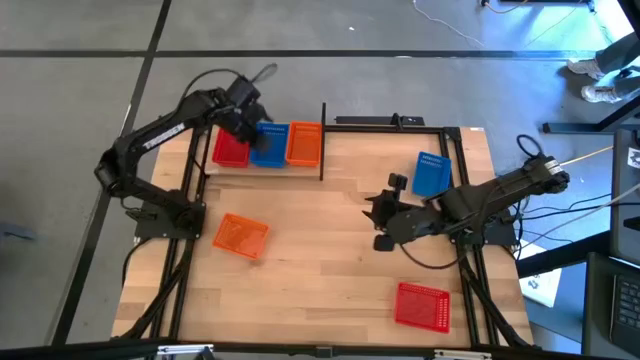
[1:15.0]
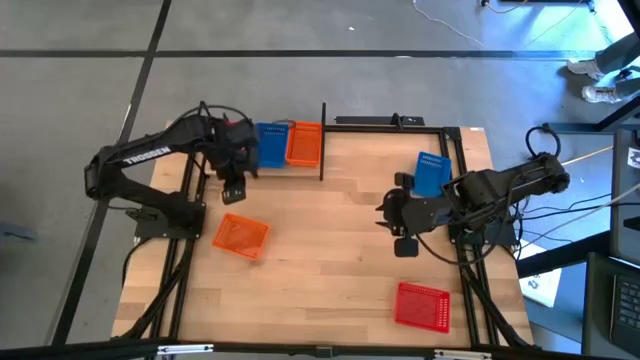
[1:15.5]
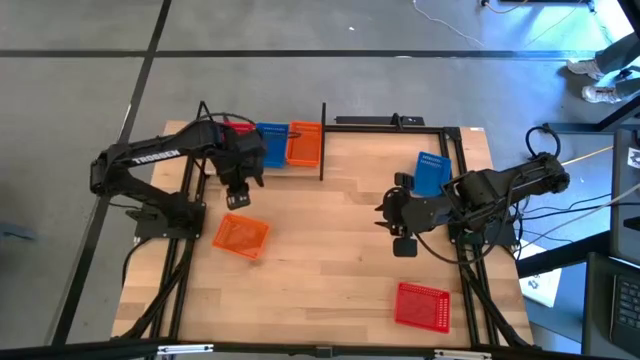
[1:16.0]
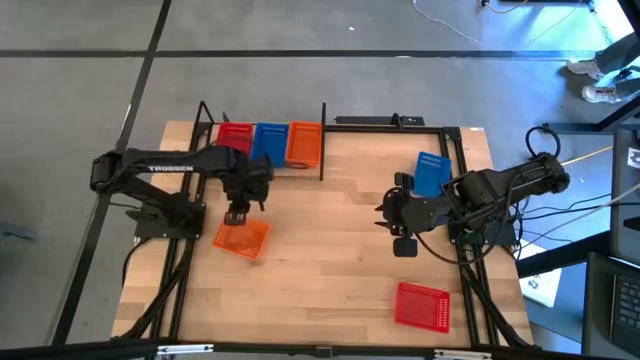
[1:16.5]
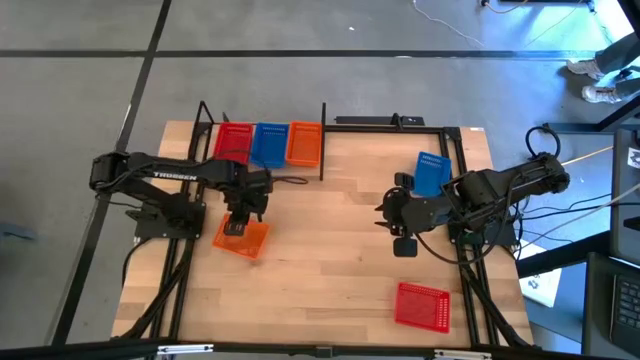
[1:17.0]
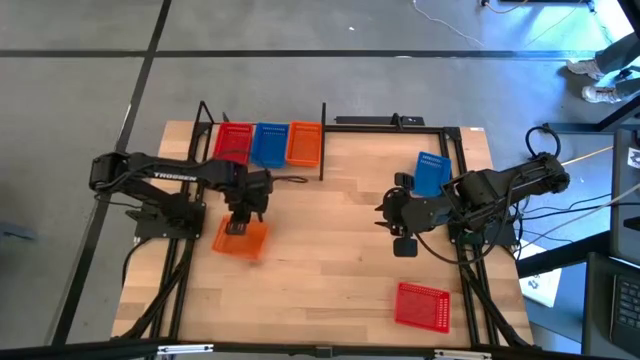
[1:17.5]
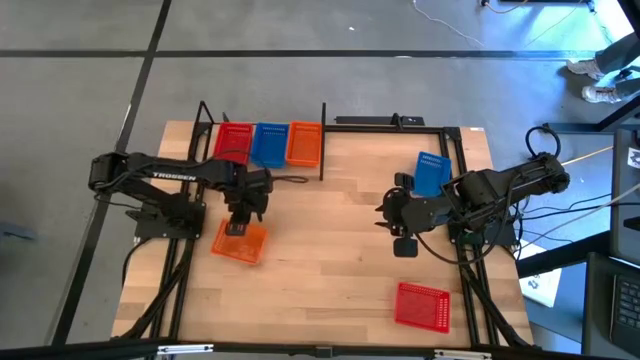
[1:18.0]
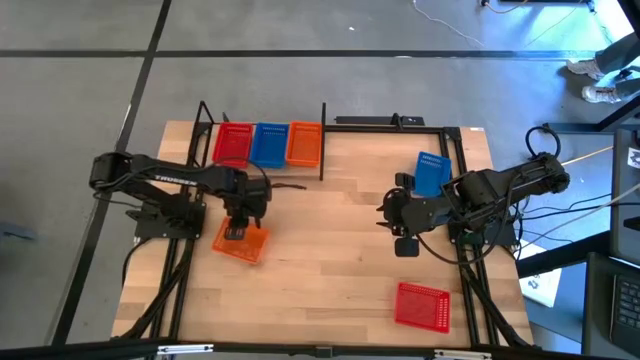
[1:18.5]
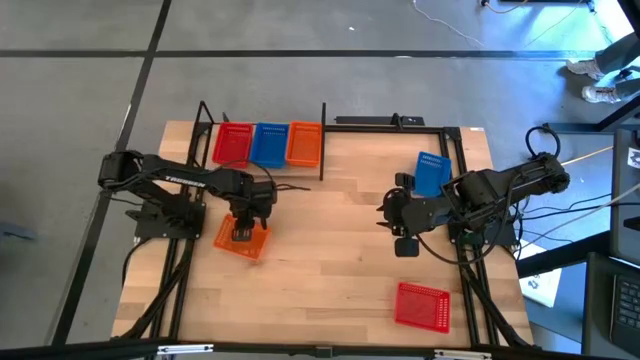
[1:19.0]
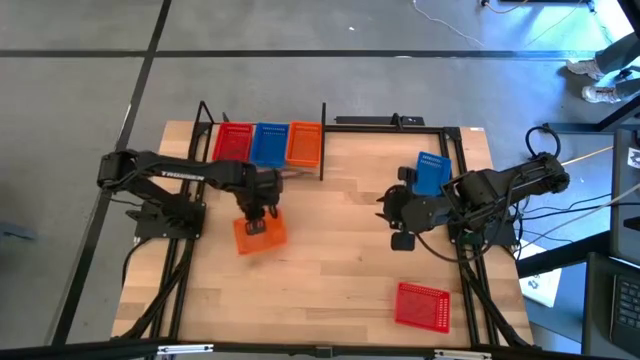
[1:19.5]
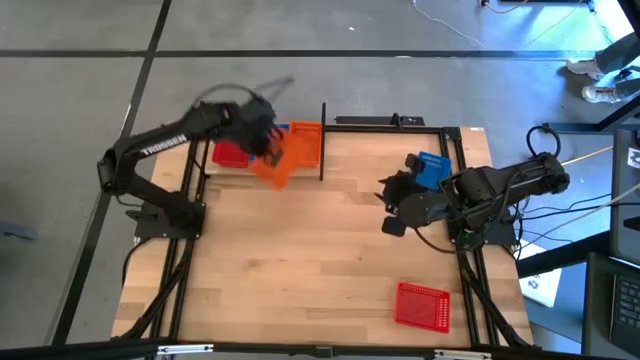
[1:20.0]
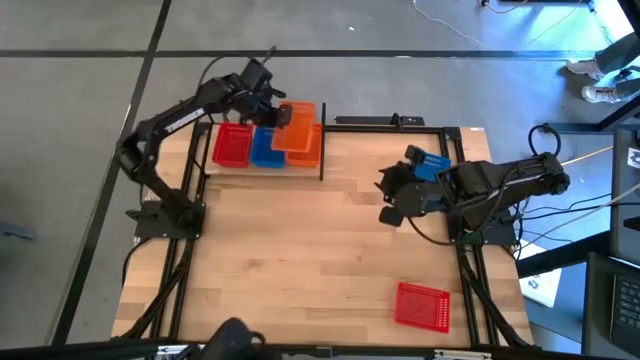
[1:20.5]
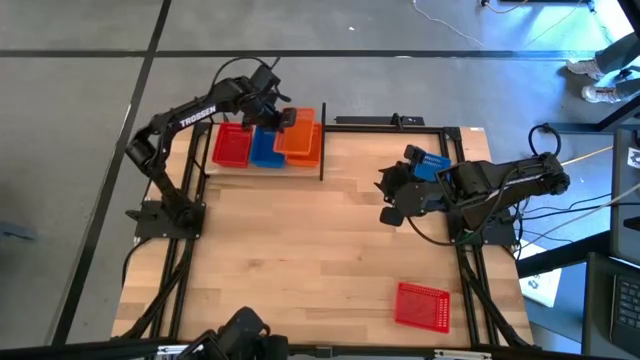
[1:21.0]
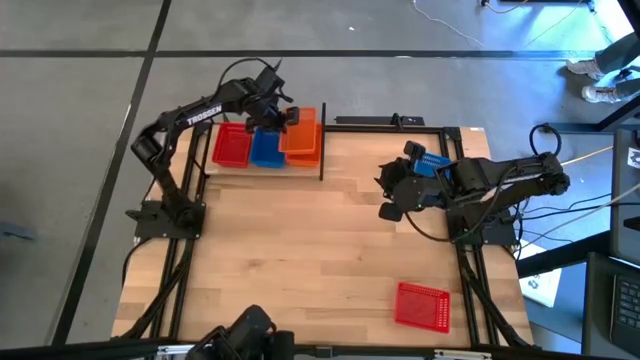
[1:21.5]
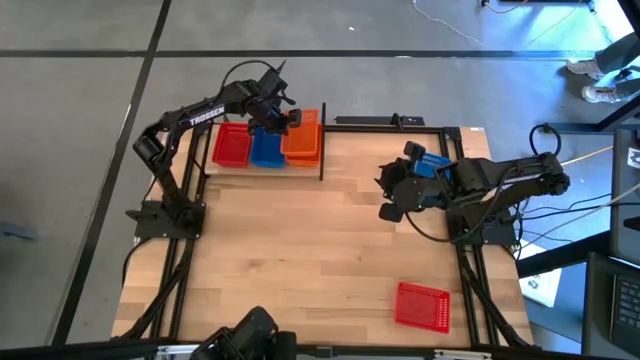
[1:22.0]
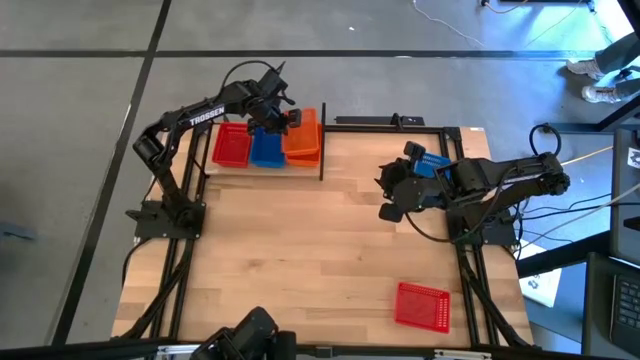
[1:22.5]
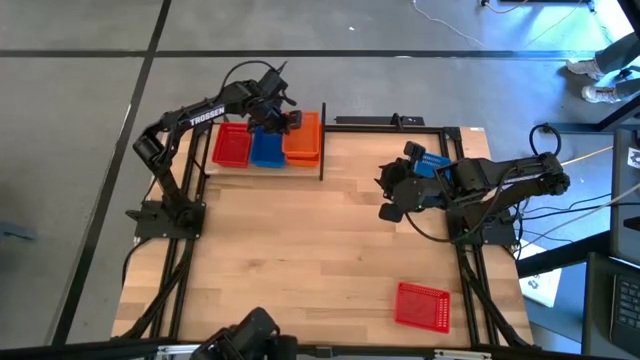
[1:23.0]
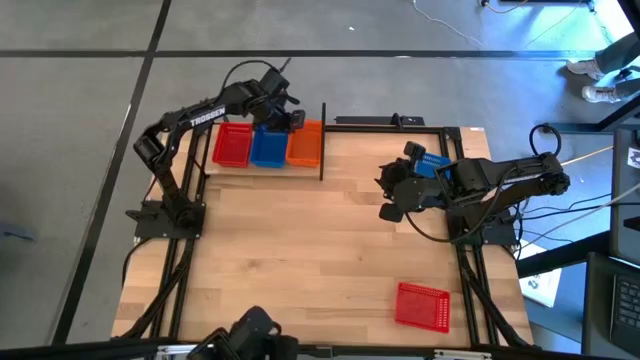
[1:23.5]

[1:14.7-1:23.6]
Task: Stack baskets on shelf by color
Stack the orange bin on the orange bins on the shelf

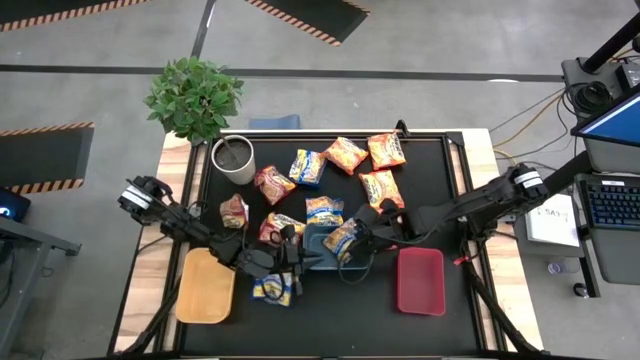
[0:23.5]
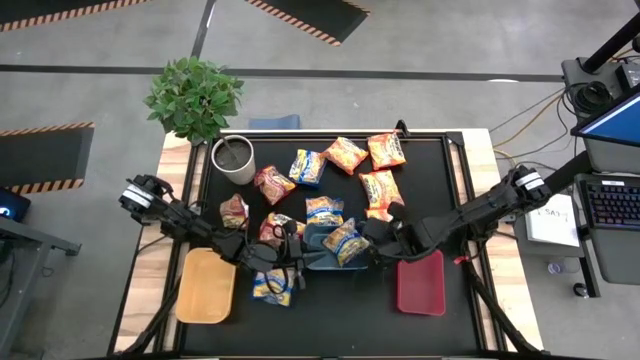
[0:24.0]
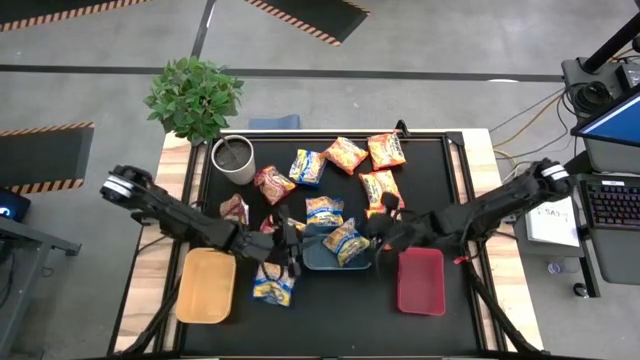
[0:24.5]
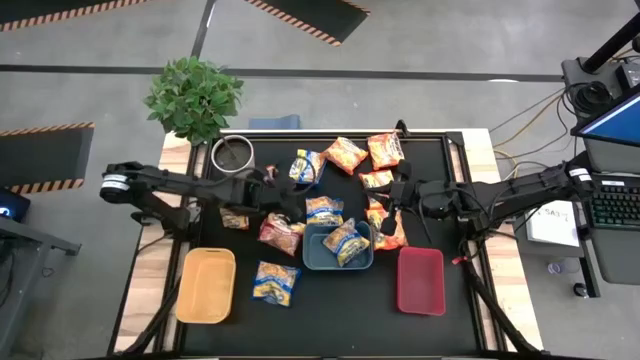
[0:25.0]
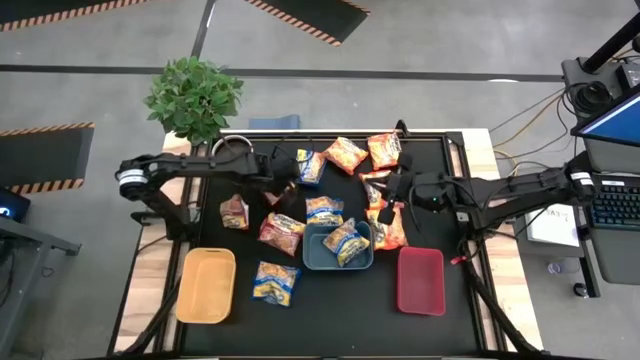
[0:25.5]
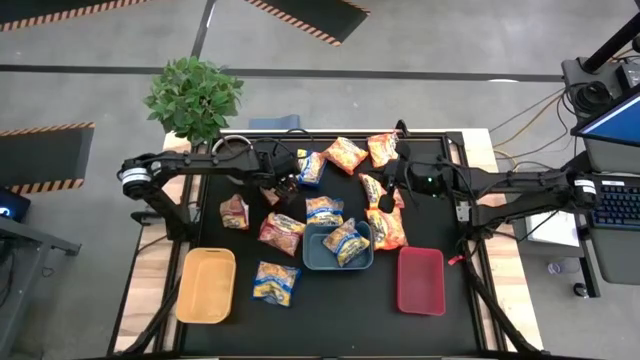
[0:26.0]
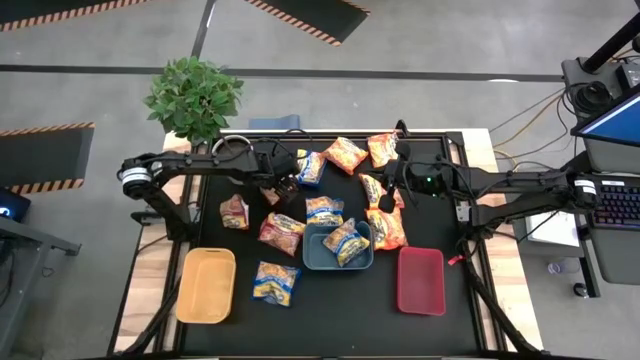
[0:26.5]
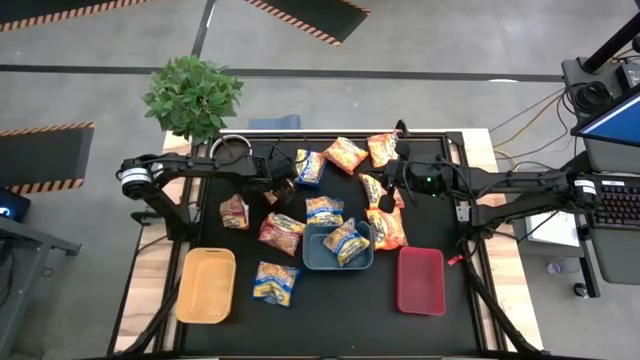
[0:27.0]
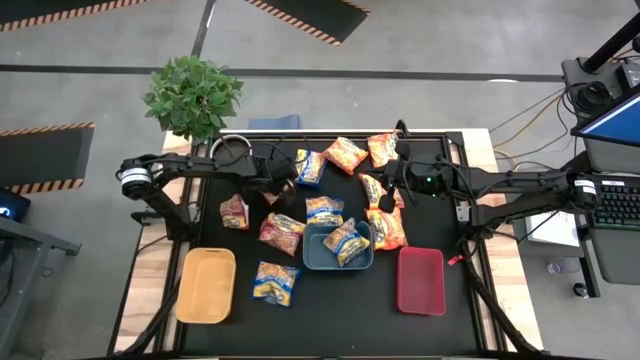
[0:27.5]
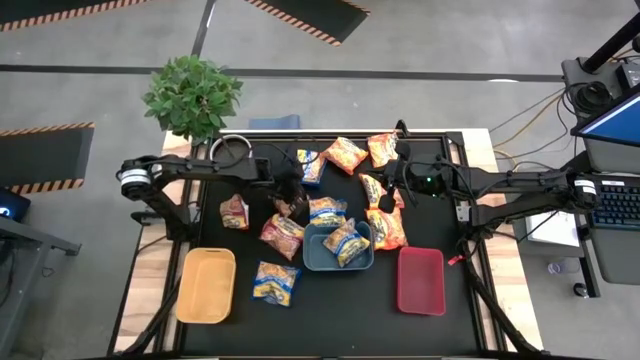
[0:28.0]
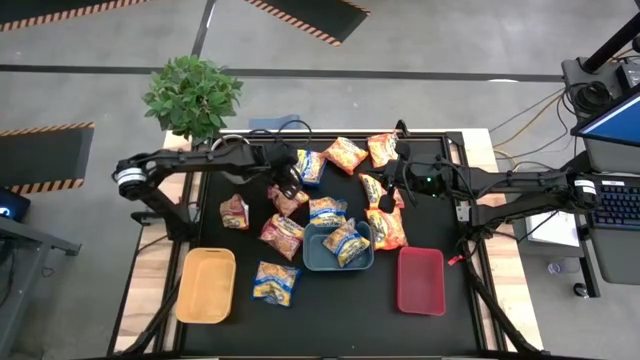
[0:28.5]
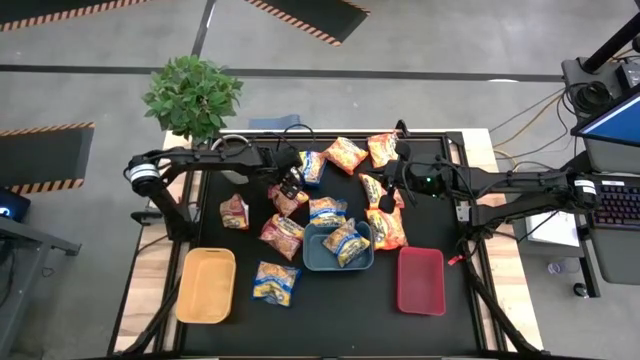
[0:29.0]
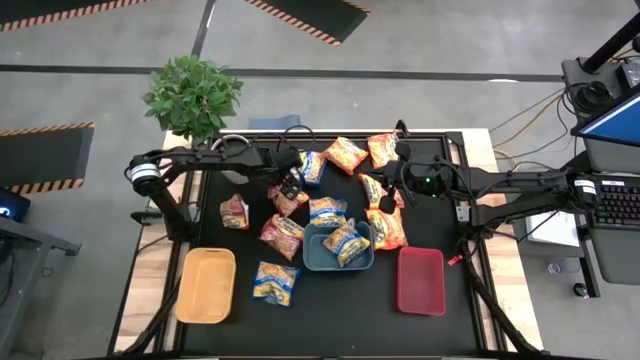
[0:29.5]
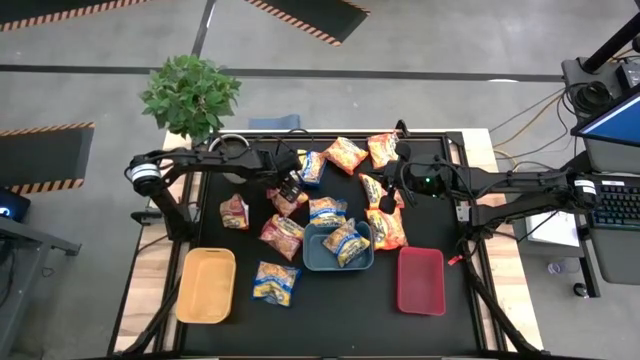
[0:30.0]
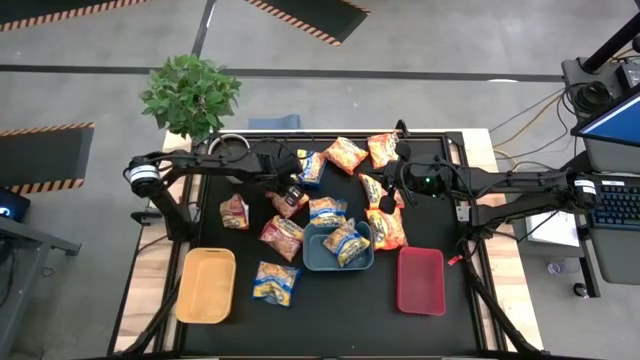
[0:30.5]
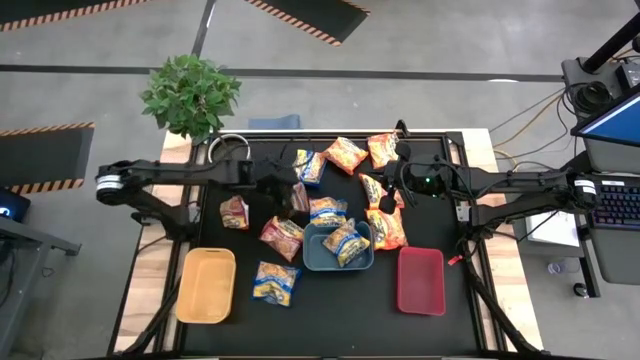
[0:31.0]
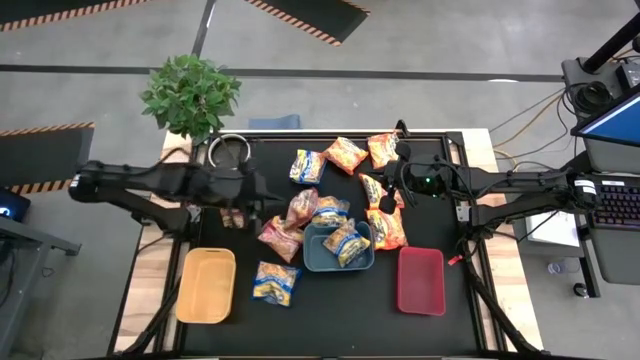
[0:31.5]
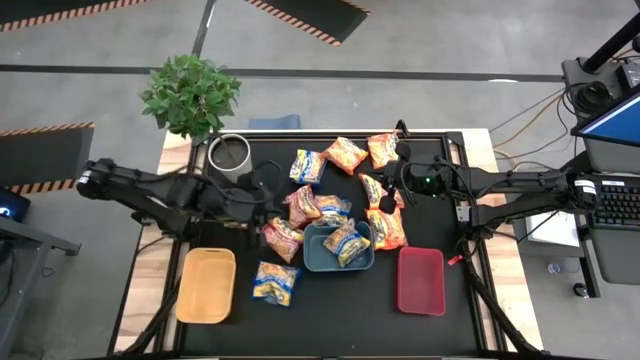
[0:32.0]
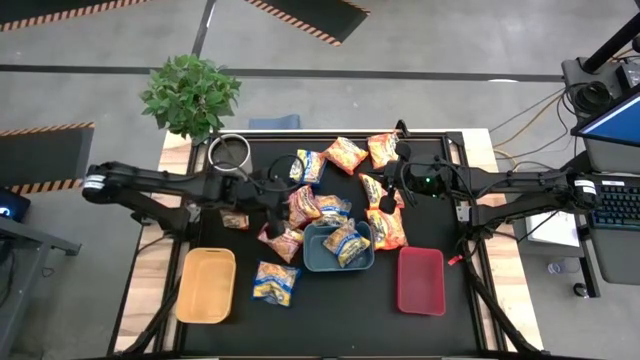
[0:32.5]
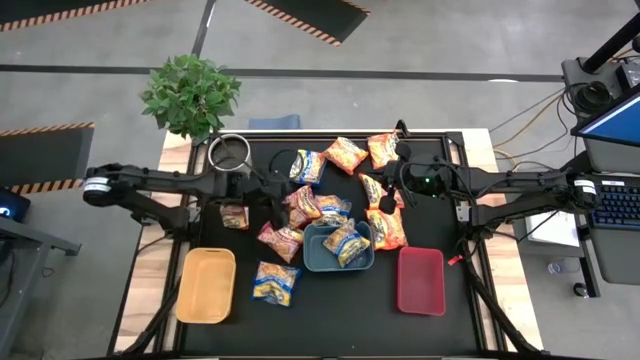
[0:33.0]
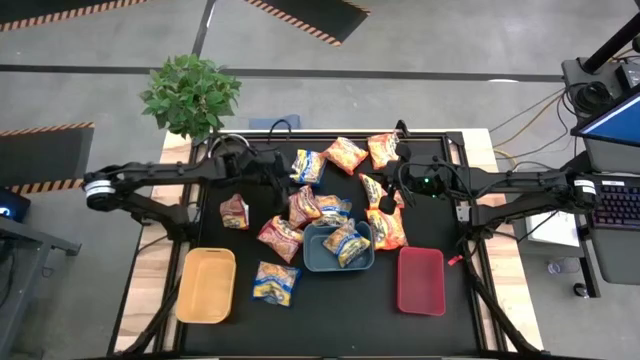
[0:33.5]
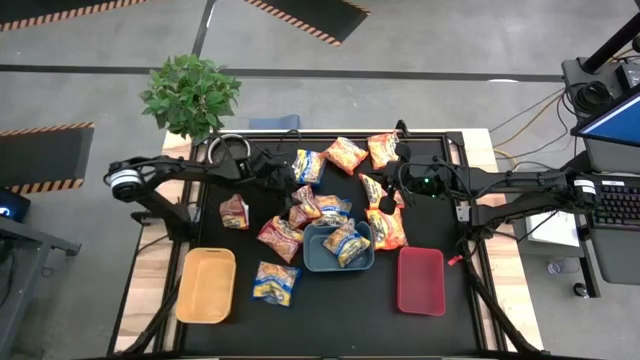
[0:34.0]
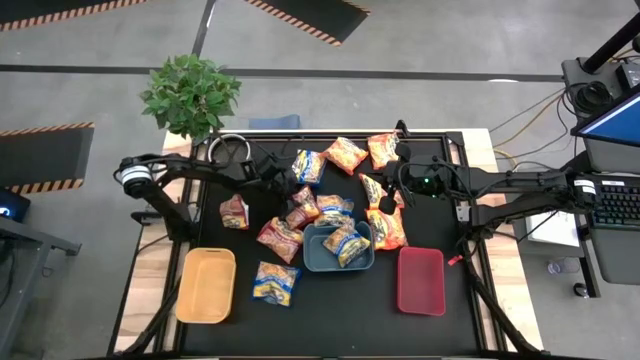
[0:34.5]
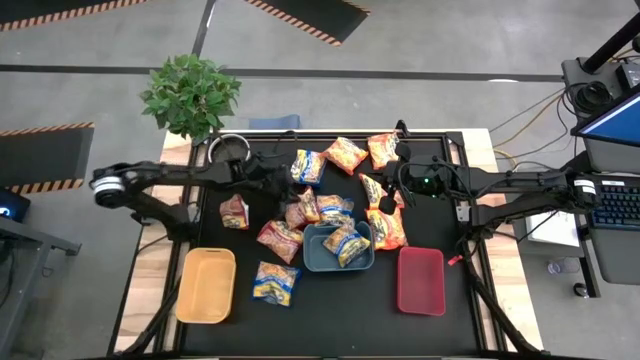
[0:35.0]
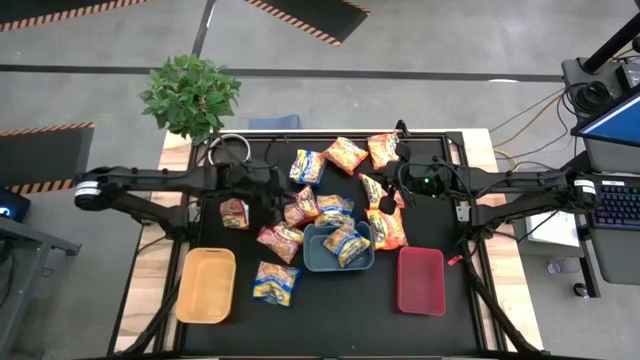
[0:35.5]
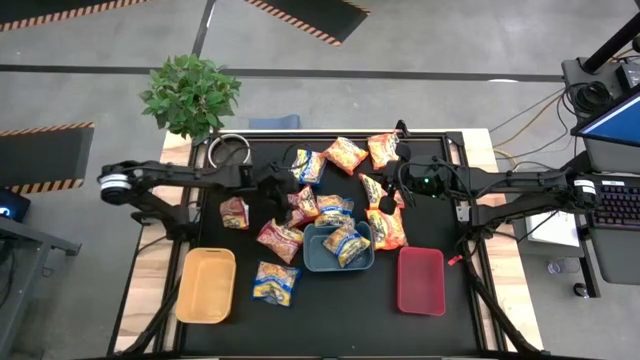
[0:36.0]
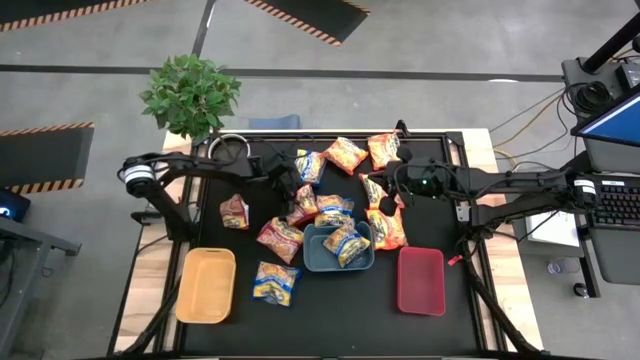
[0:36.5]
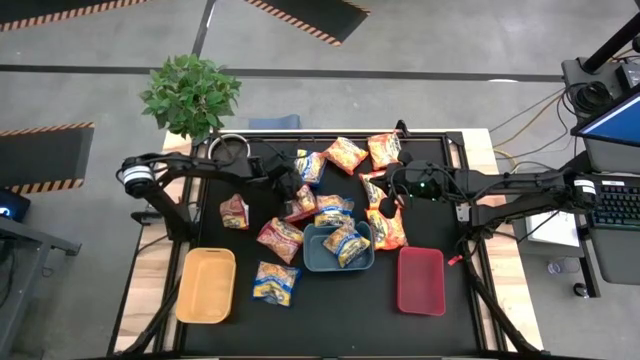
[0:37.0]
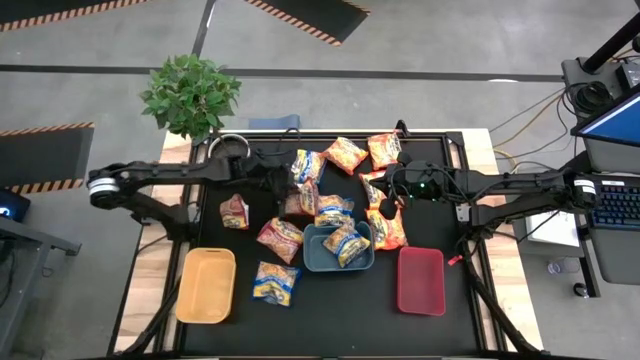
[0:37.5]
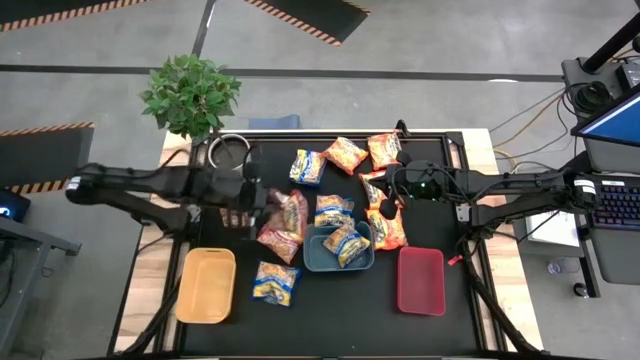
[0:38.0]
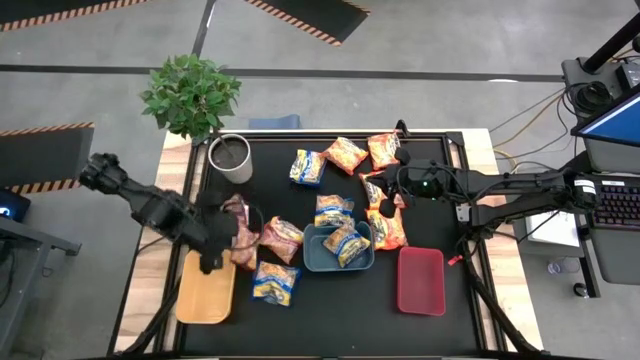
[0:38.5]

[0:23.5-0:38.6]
Task: Sort Maruchan noodles
Put the top right red noodle pack into the yellow bin
